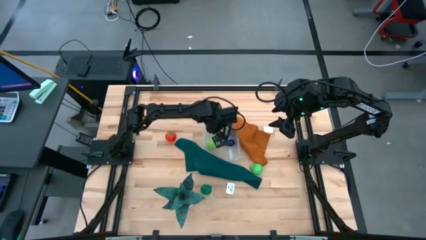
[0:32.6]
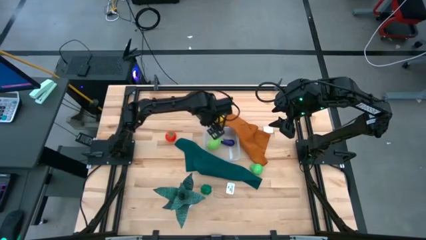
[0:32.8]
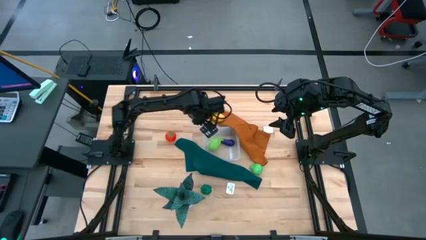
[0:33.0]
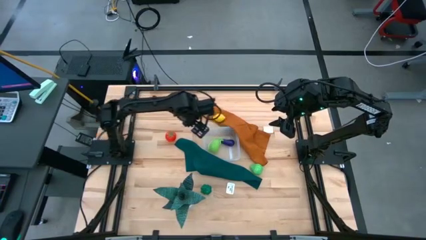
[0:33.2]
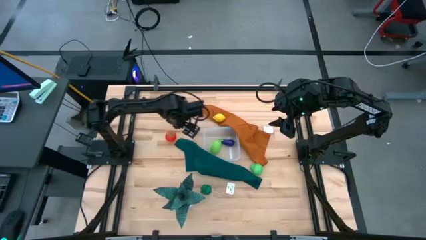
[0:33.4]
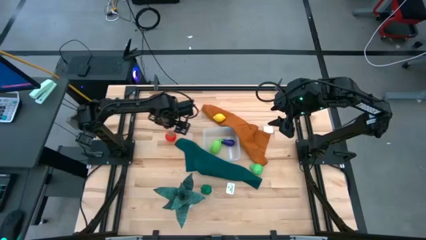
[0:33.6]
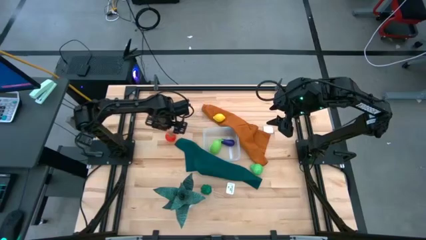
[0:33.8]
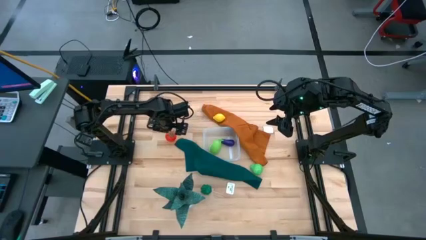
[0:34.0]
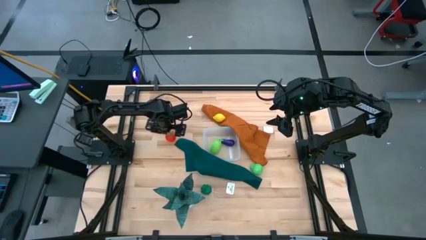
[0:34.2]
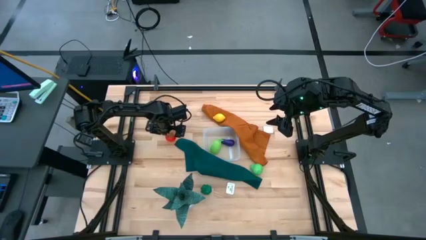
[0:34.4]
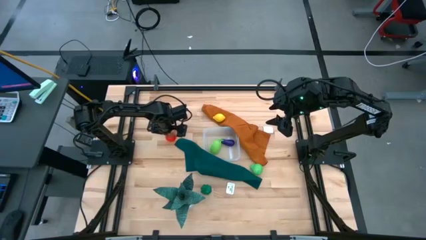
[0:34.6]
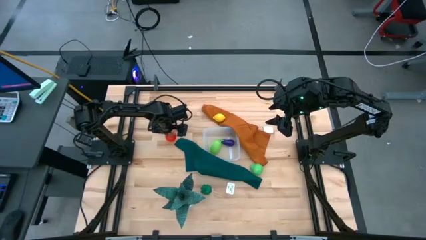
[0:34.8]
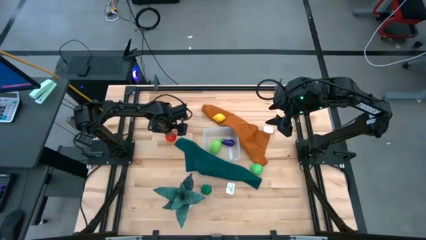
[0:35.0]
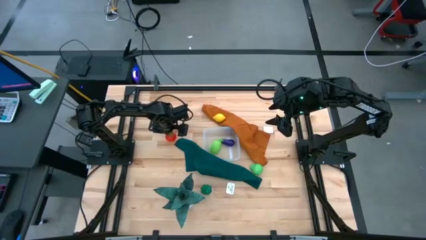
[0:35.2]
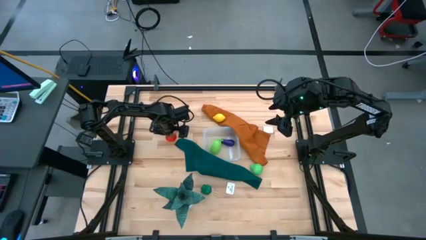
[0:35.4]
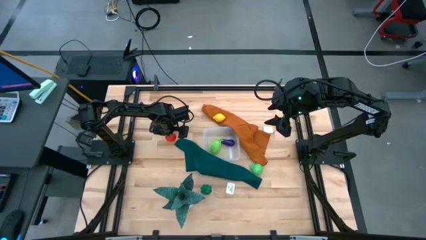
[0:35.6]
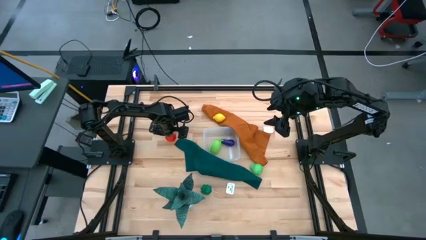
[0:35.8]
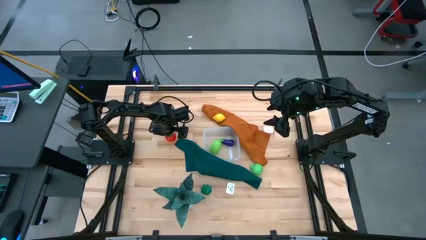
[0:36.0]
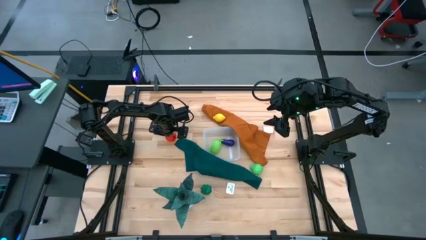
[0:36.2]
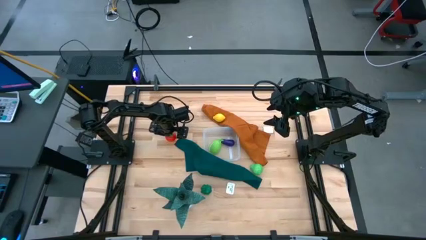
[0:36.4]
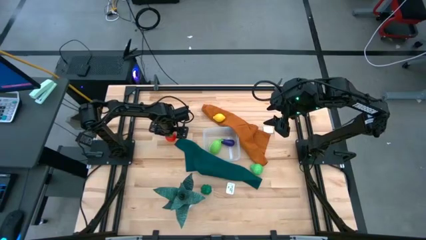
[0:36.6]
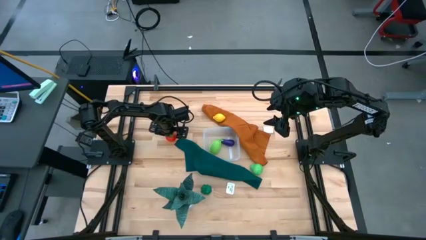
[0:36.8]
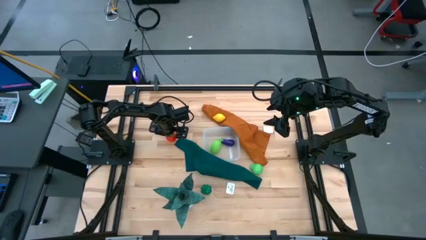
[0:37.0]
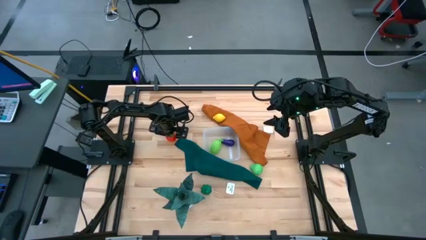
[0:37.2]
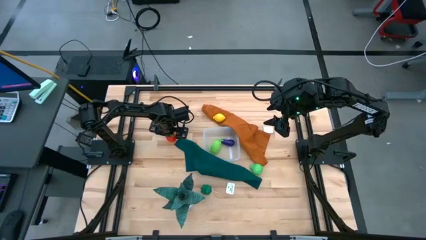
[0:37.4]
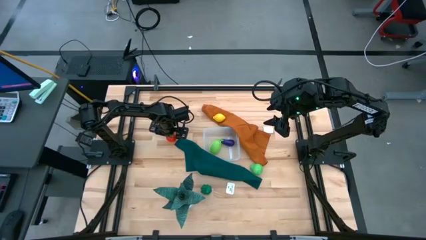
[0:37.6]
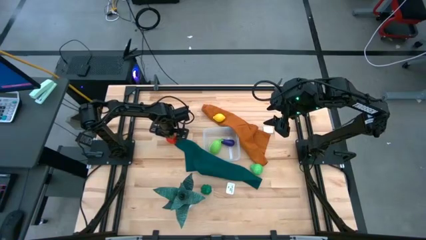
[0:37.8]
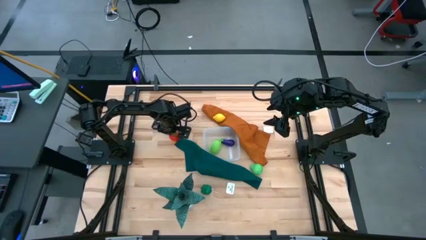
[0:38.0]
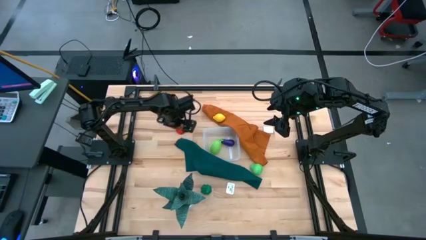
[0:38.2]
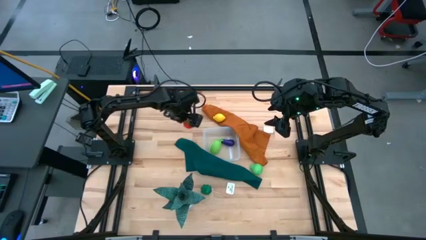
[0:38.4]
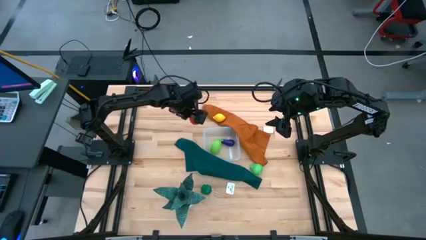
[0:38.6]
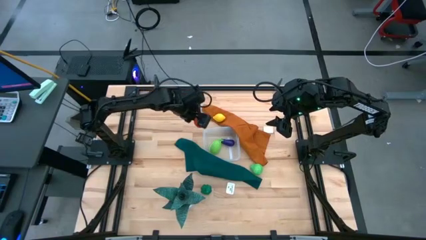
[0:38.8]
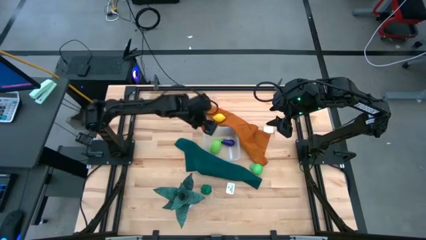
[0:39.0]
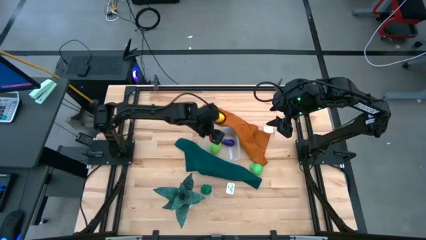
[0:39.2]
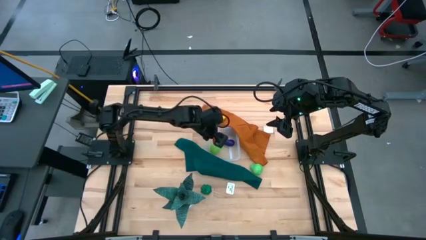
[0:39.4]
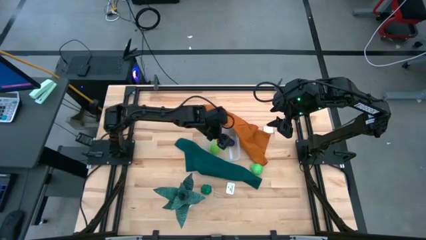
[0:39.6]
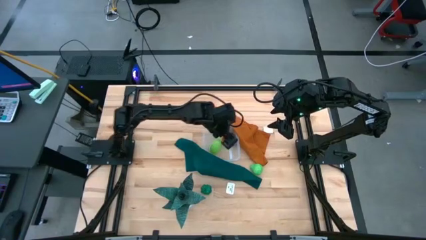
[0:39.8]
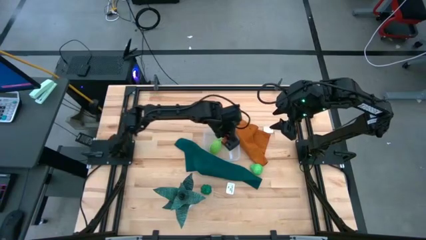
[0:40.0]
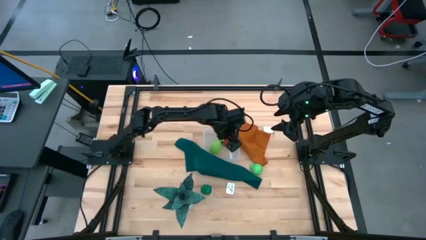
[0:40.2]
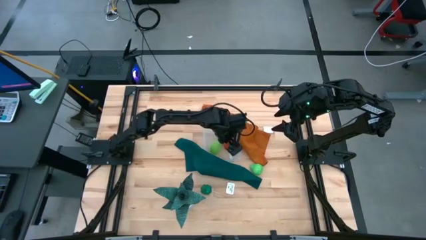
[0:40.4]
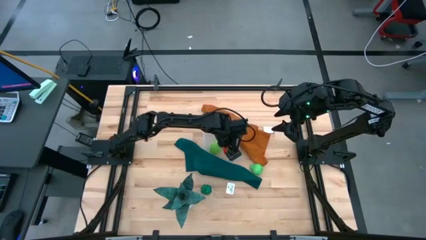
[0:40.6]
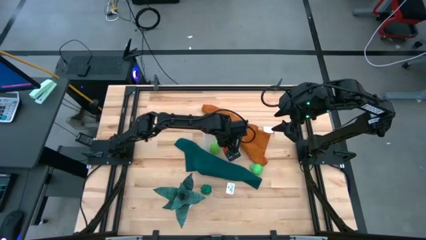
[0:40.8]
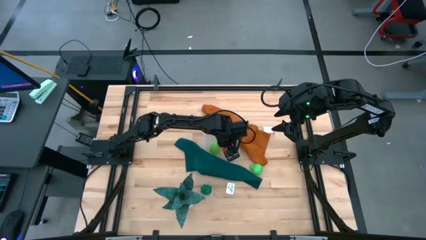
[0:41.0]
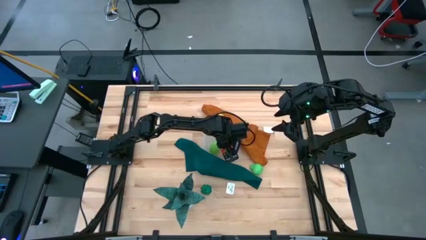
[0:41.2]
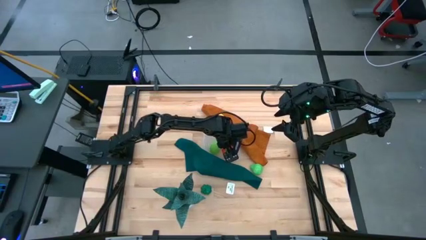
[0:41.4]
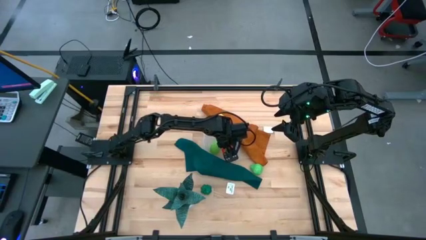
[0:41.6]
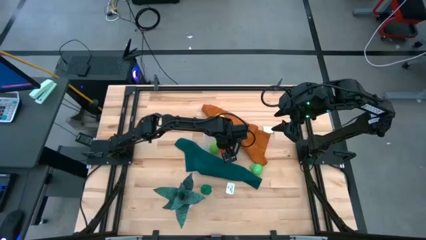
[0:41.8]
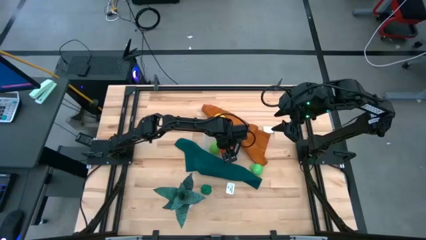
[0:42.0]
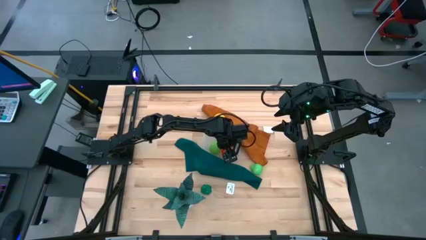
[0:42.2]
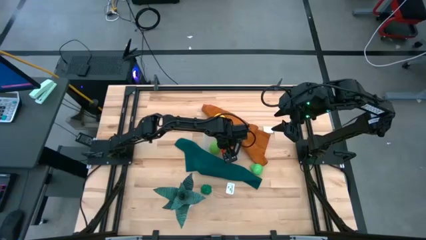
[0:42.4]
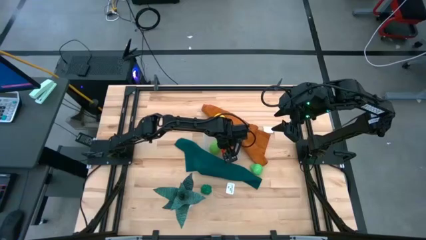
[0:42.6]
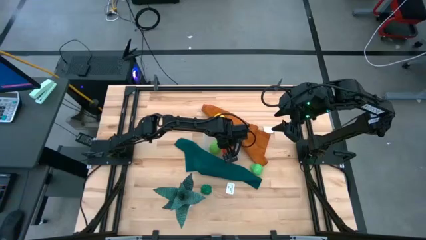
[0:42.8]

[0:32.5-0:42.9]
Task: Pick and placing Produce into tupperware
Put the red tomato into the transparent bin
